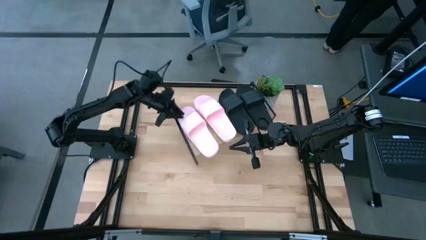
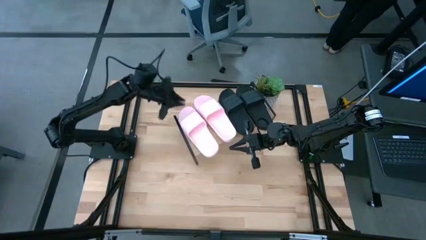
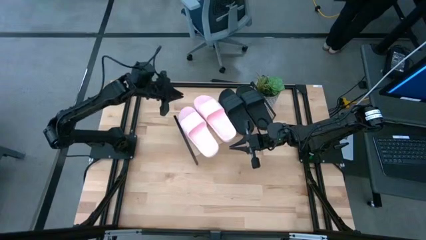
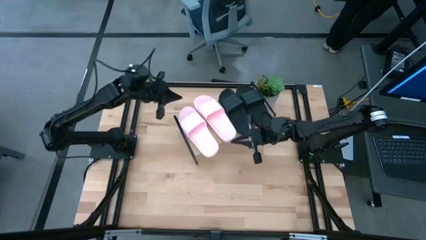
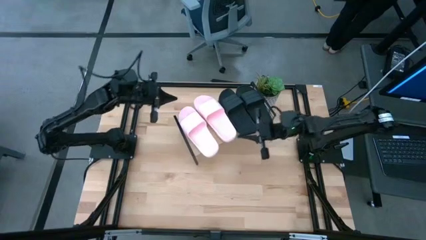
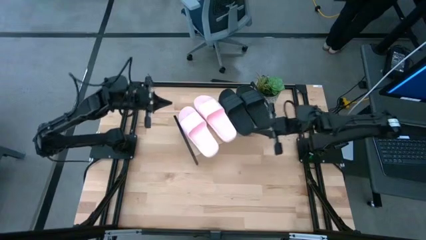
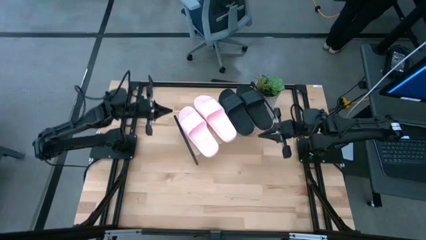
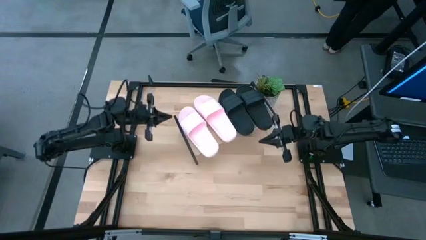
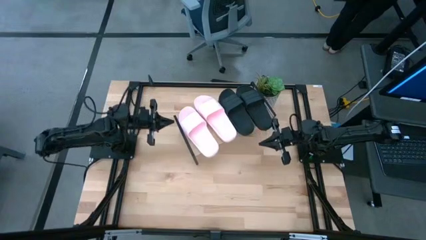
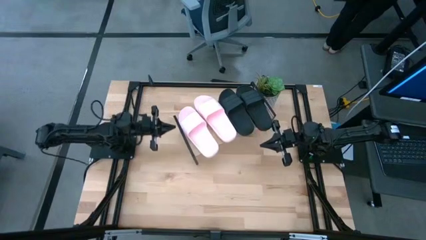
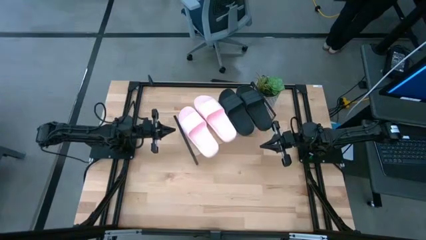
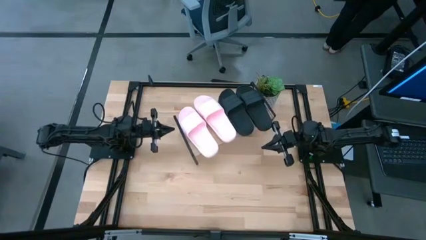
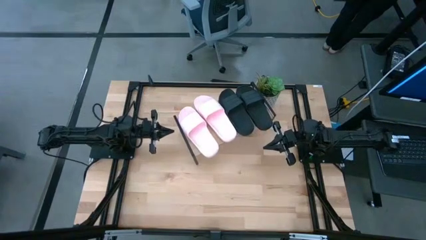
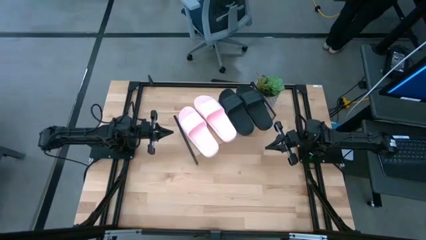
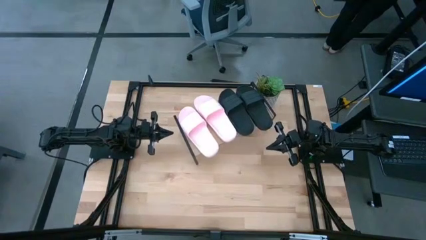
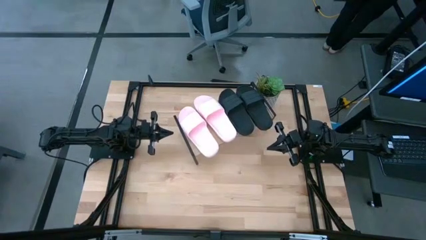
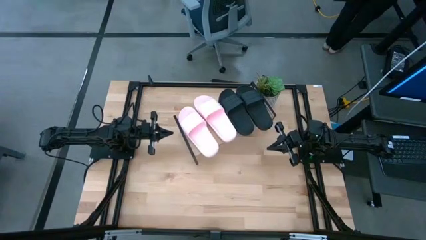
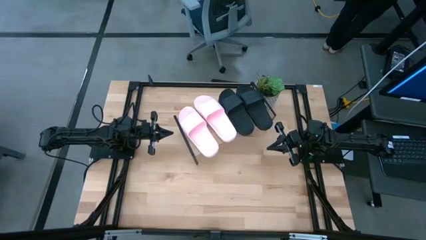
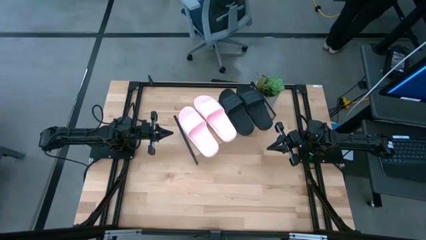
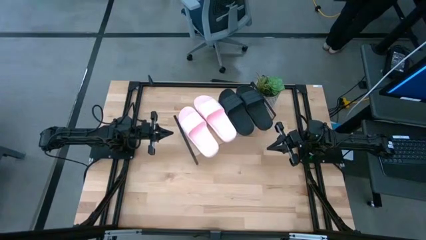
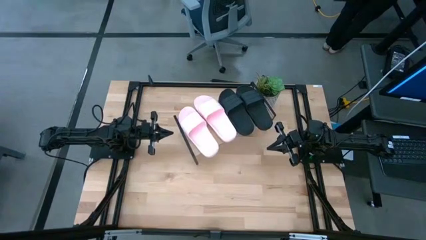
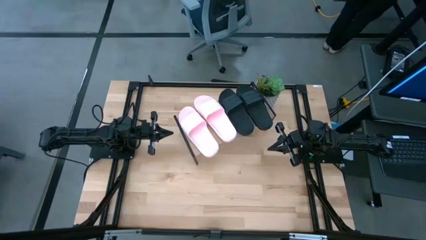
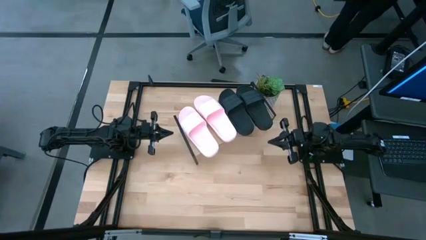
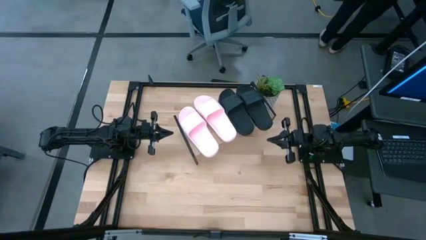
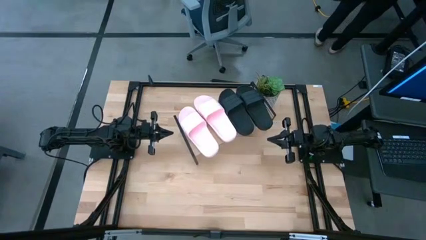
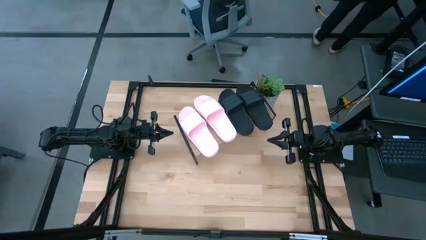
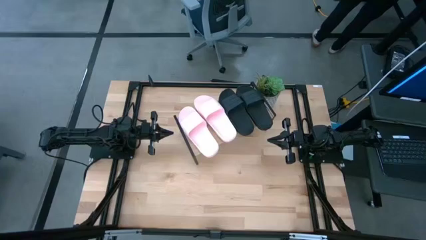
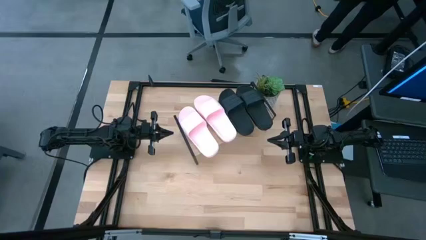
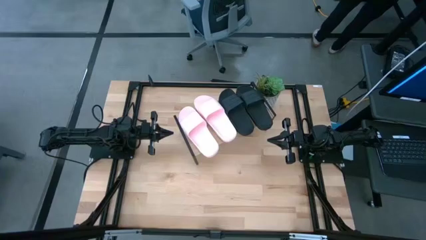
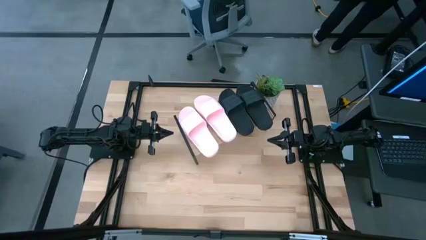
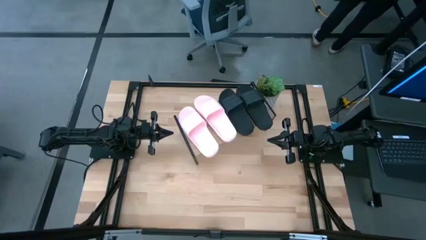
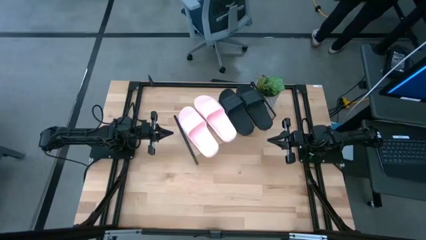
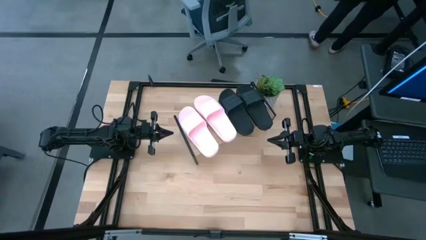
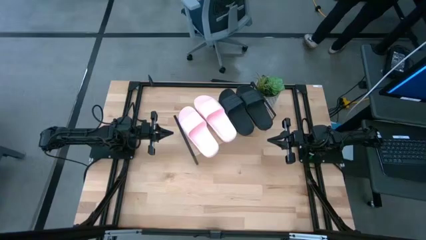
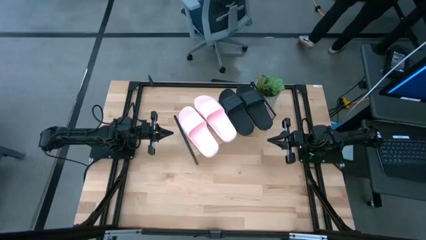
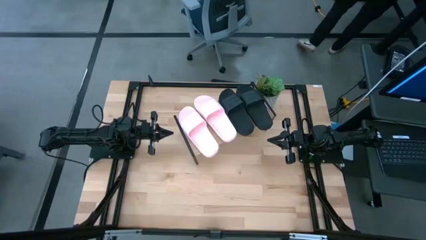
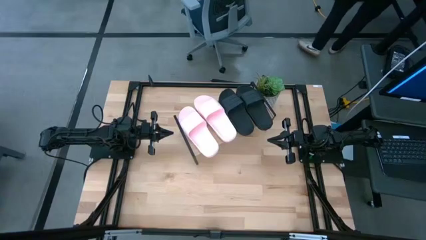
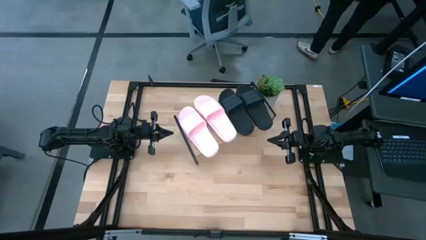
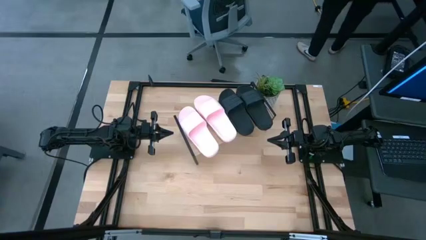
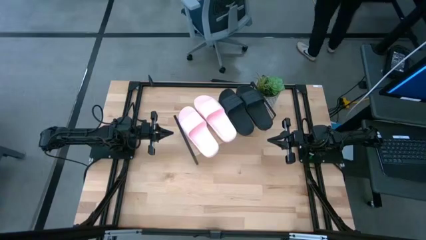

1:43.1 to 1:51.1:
Task: Pick and place slides into the shelf
Return to Home Position

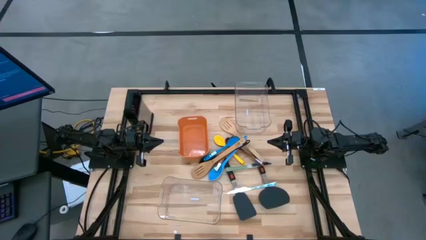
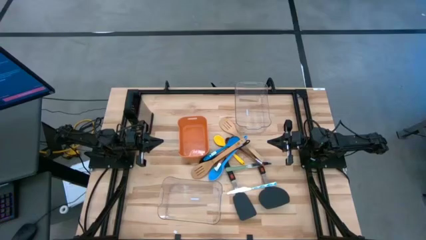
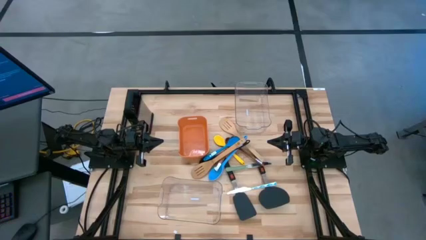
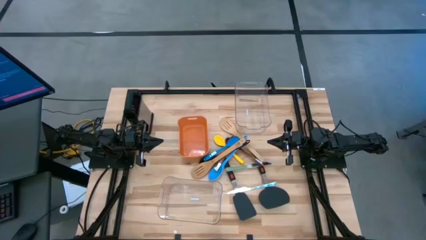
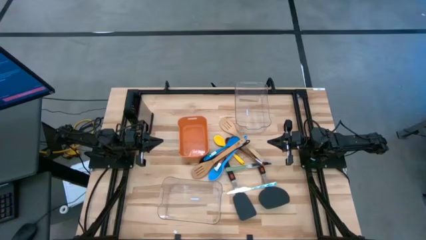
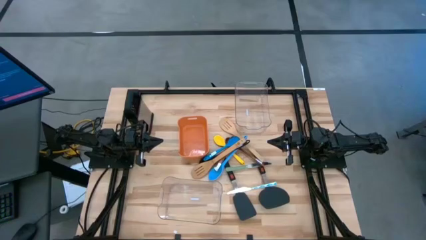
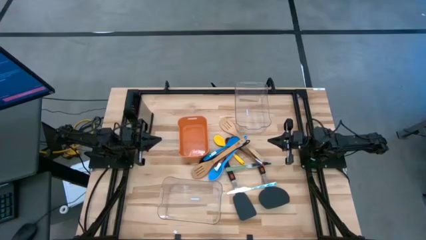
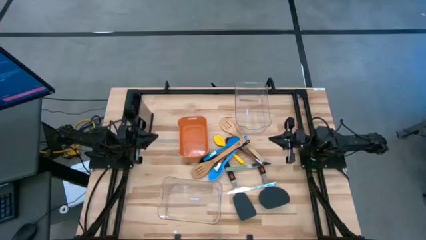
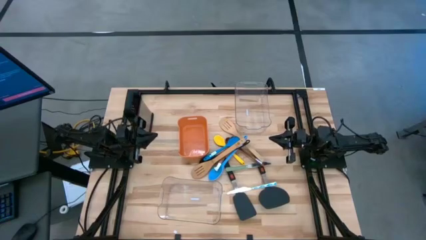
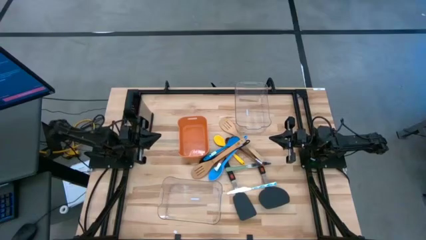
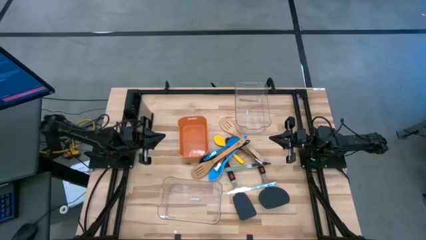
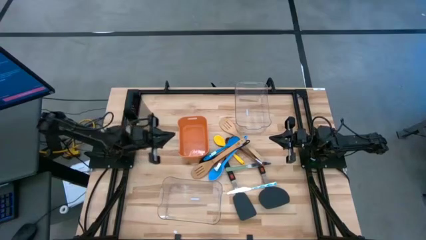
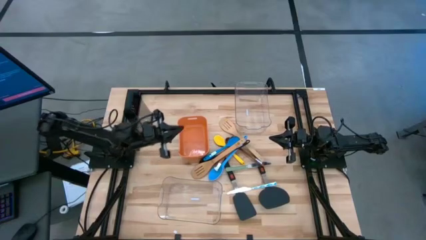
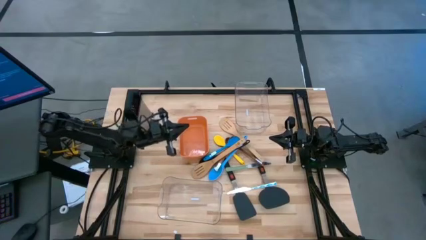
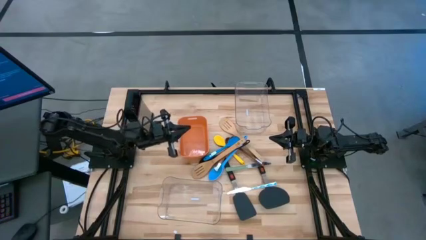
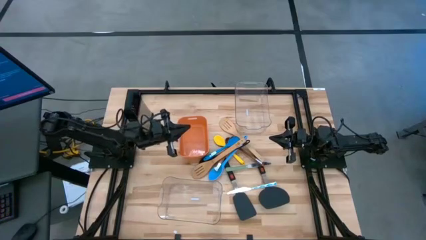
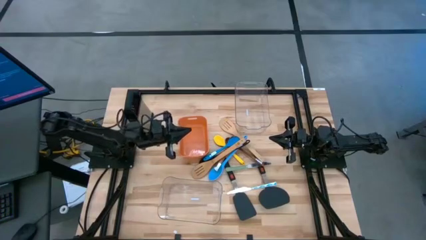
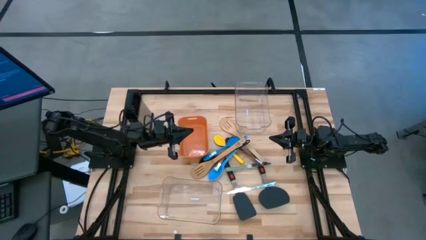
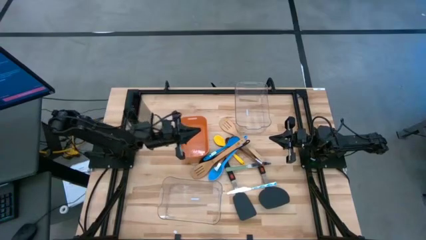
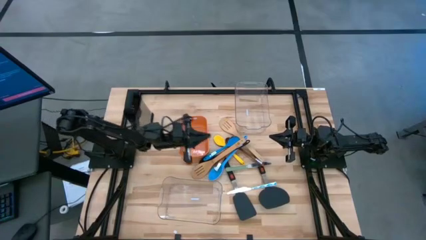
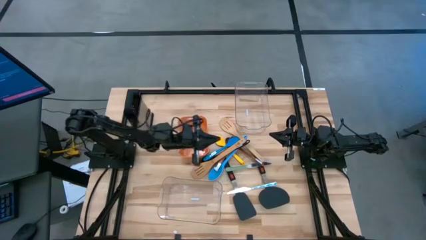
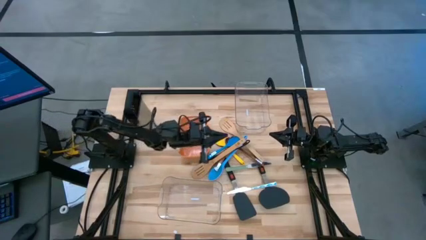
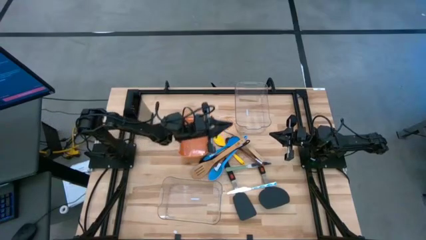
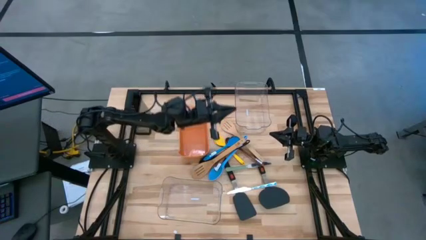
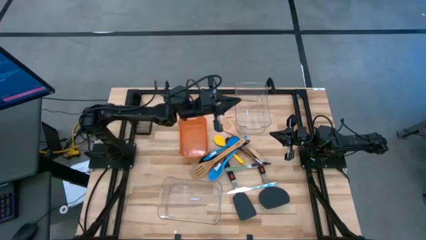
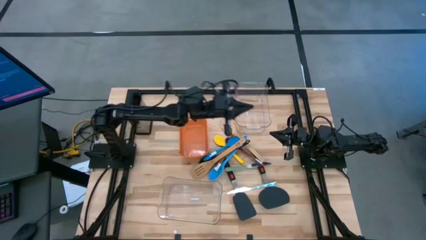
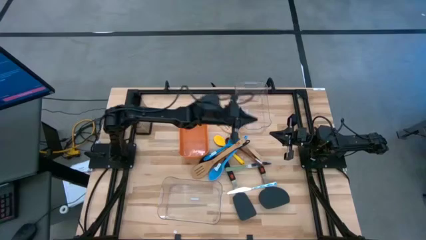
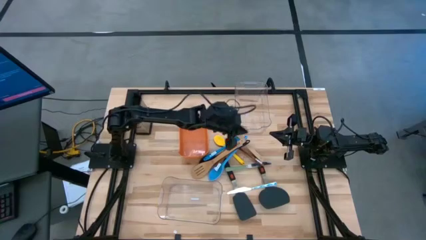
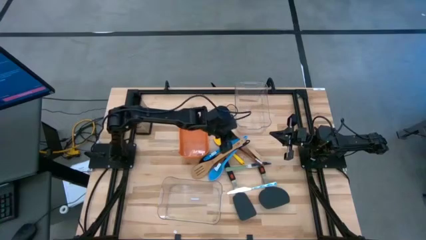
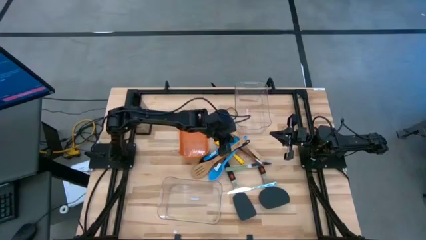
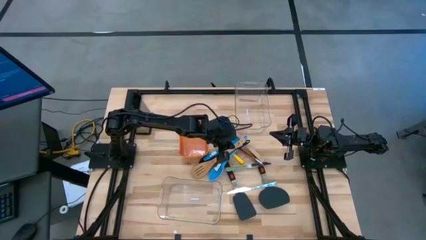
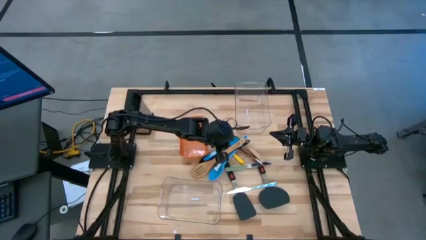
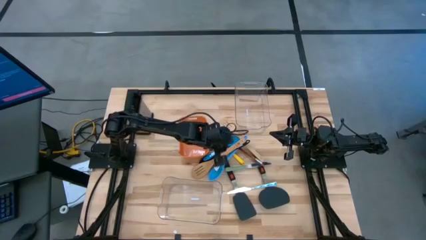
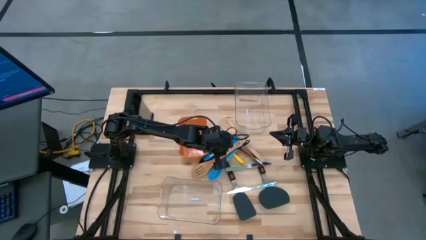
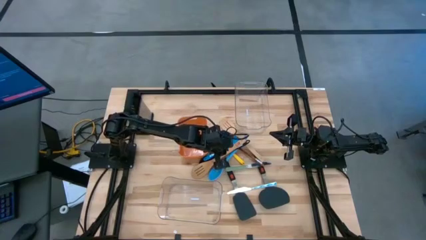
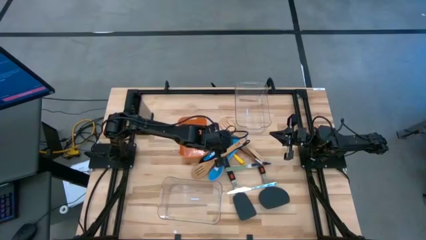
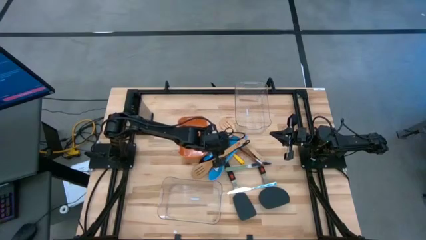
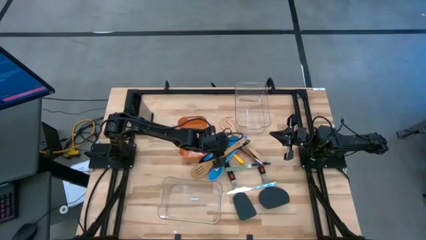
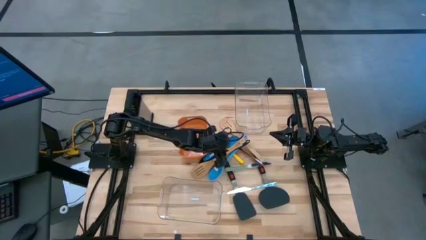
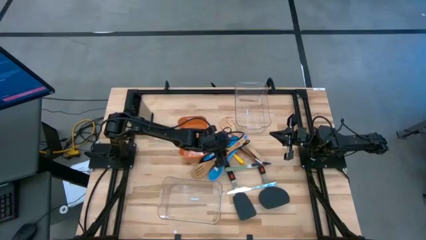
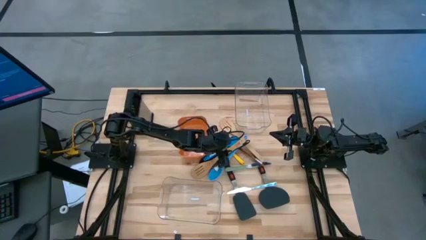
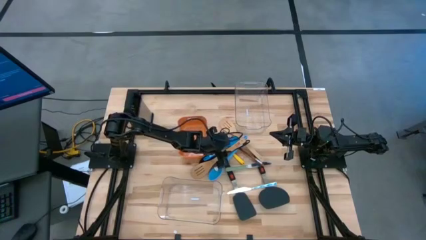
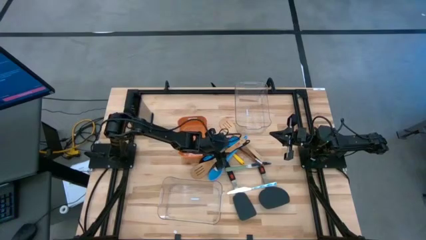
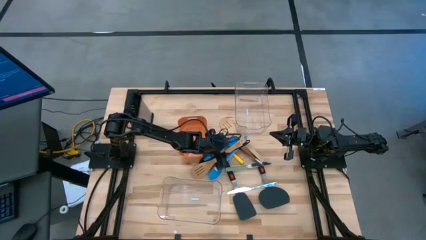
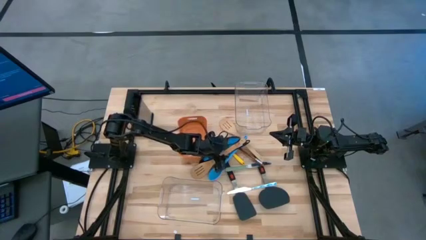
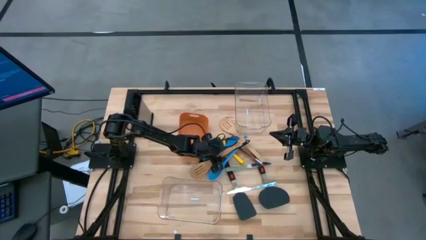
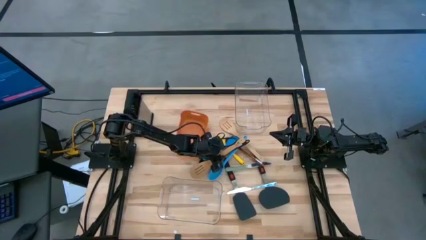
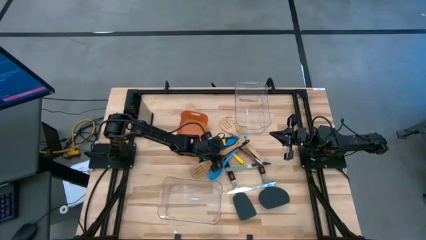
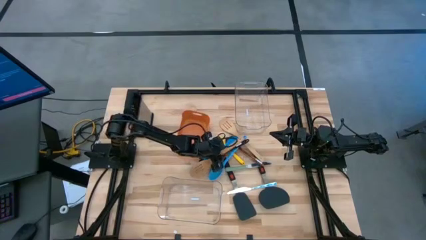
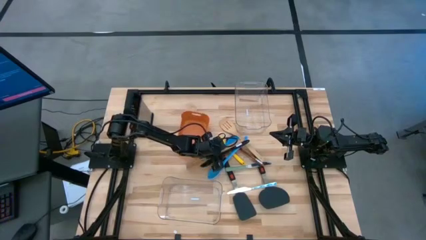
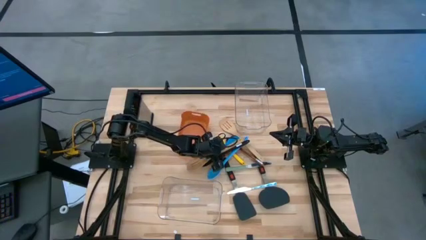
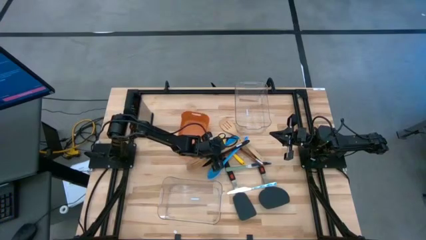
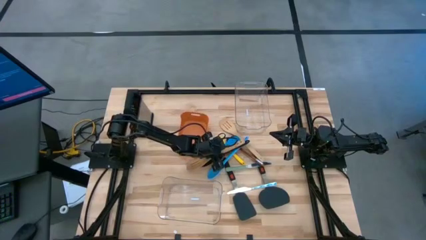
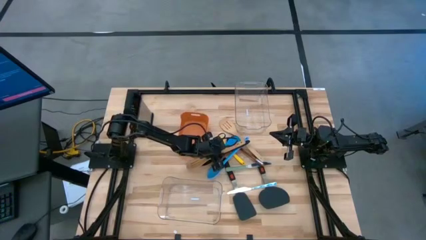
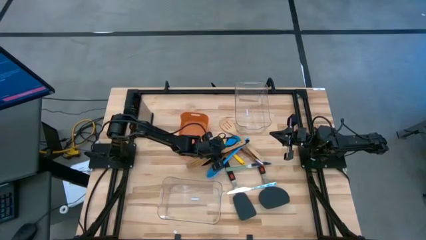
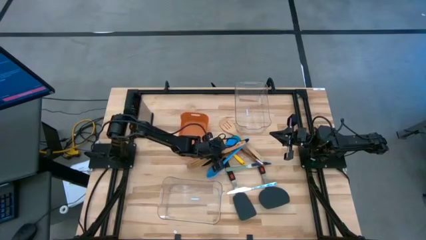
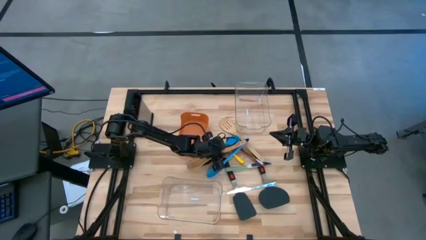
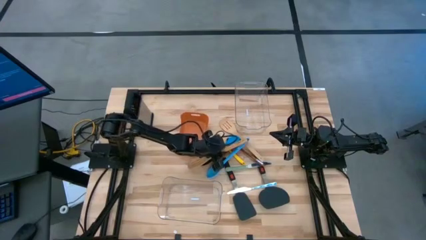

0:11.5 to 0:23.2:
Task: Pick & Place Kitchen Items
Put the brown spatula into the top transparent bin
